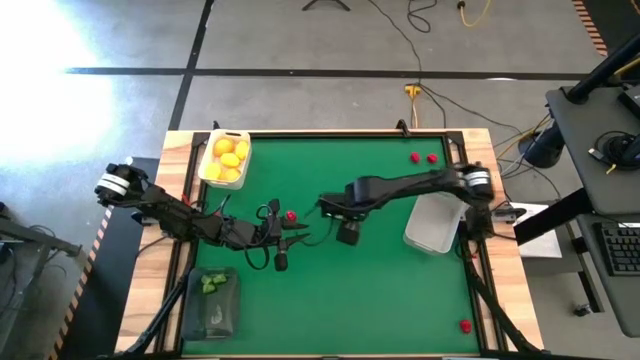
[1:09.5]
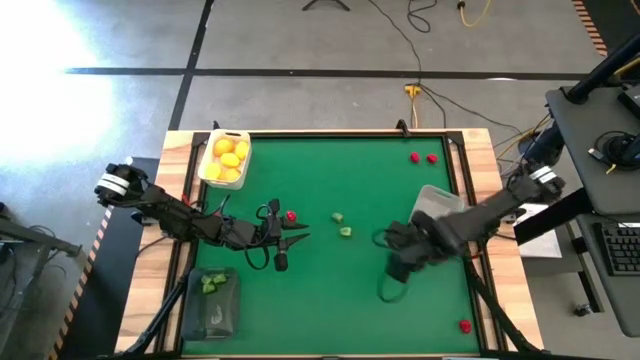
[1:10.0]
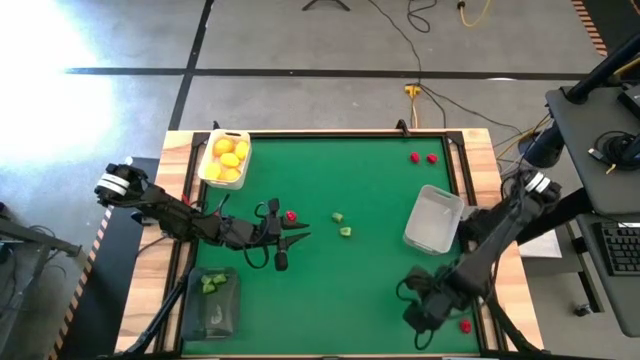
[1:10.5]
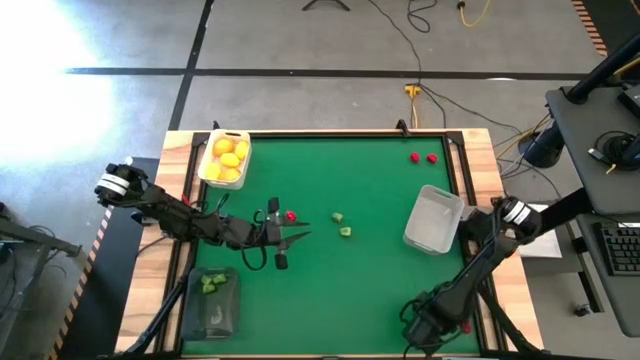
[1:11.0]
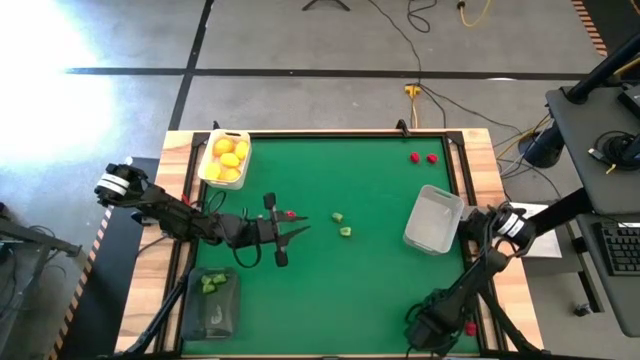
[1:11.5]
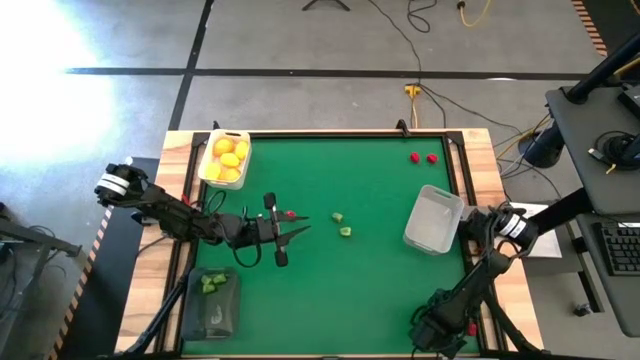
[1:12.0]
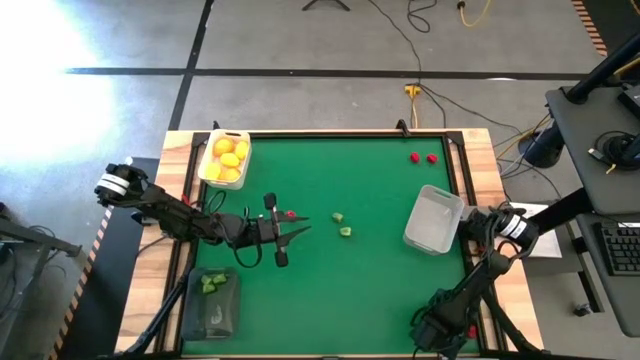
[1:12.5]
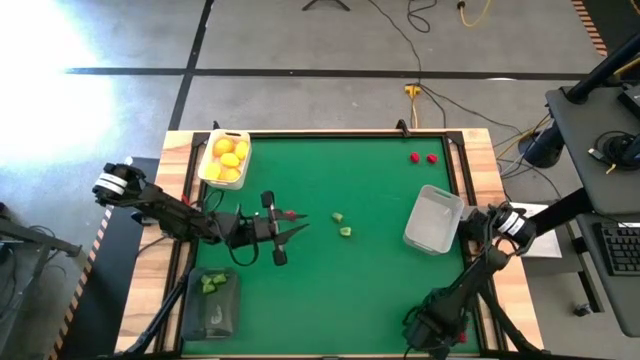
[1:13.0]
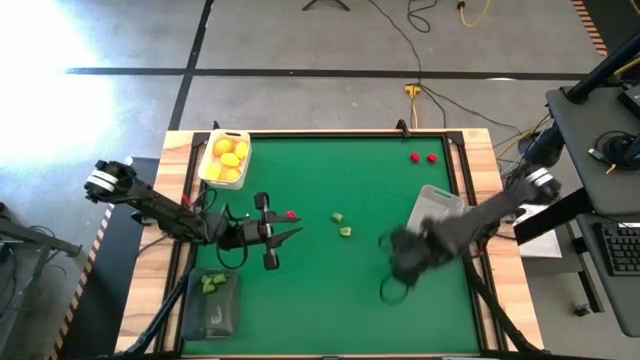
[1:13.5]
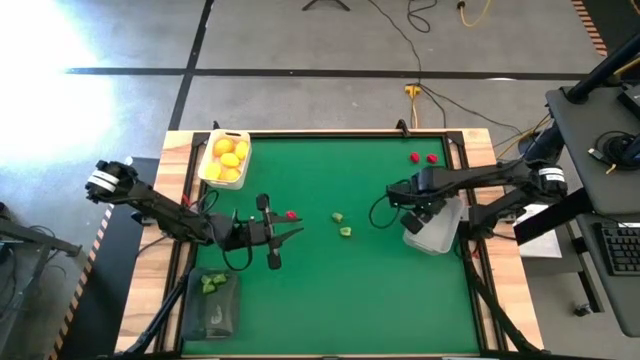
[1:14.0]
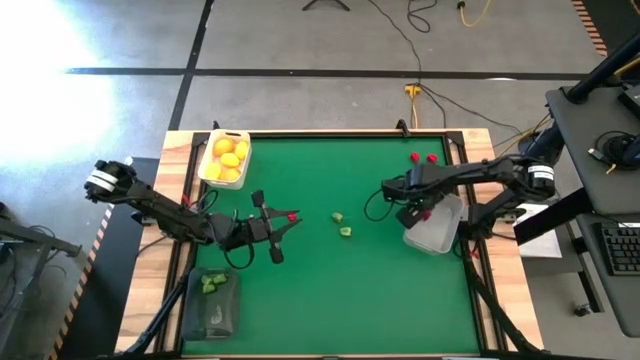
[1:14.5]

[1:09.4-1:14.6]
Task: Sort produce into baskets
Put the red chili pepper into the gray bin

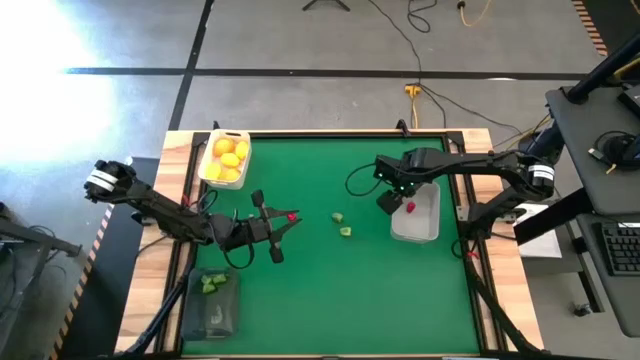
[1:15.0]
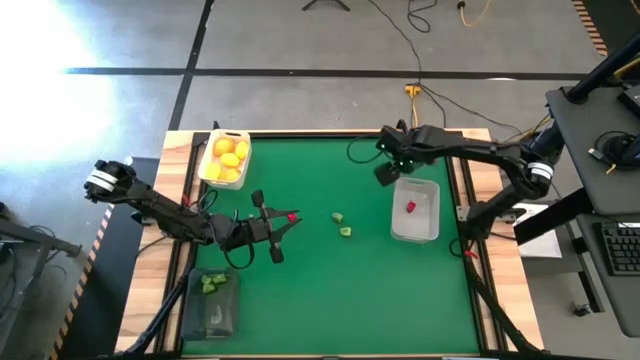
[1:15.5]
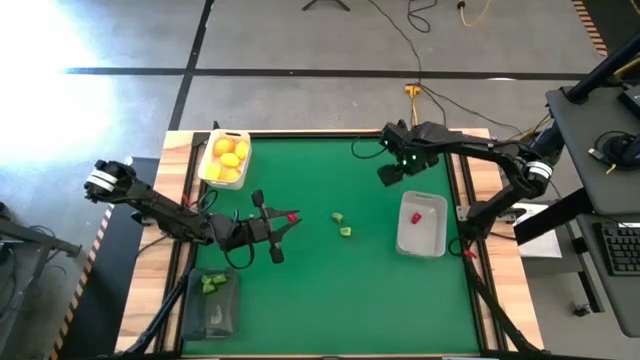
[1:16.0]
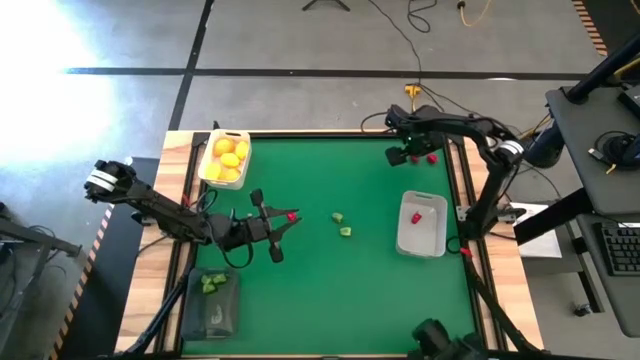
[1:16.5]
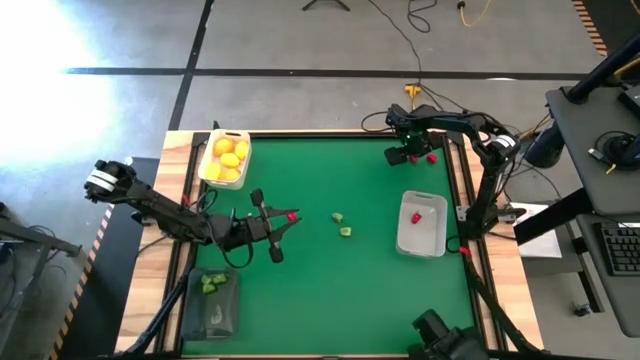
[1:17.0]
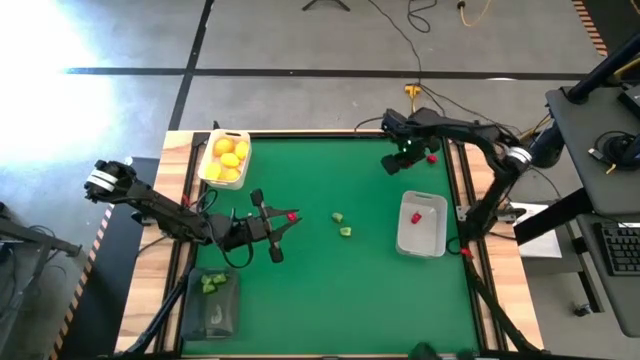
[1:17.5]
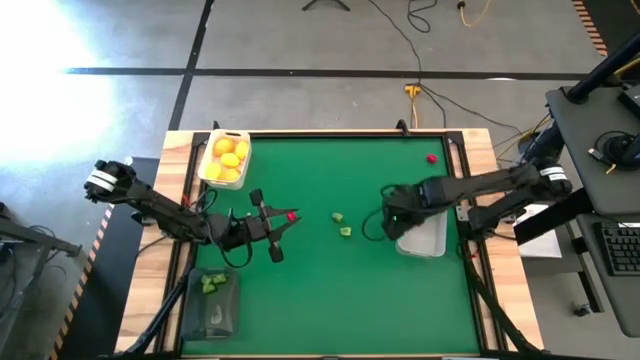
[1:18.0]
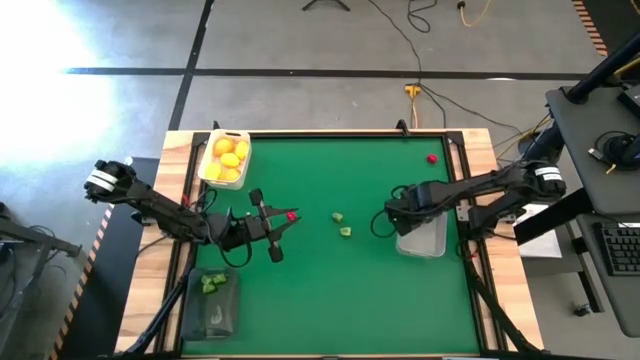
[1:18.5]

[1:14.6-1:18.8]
Put the red chili pepper into the gray bin

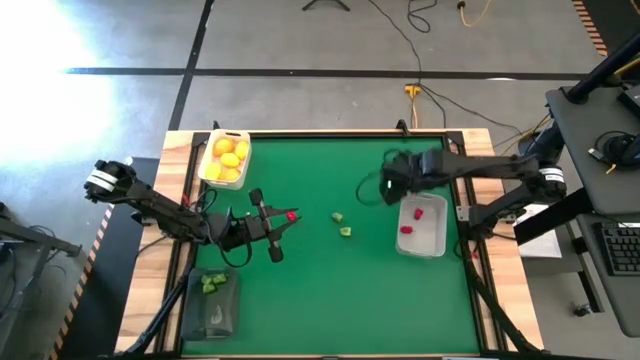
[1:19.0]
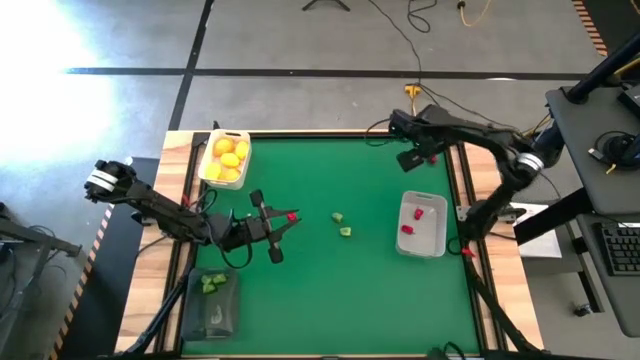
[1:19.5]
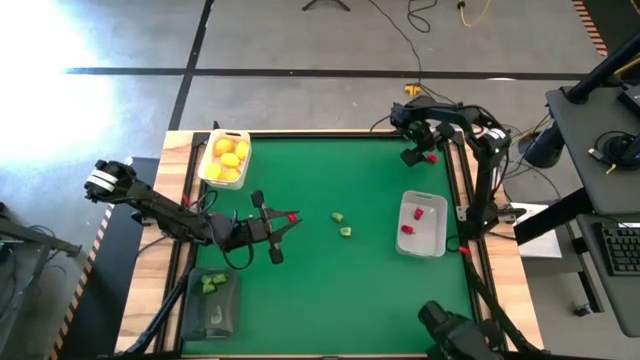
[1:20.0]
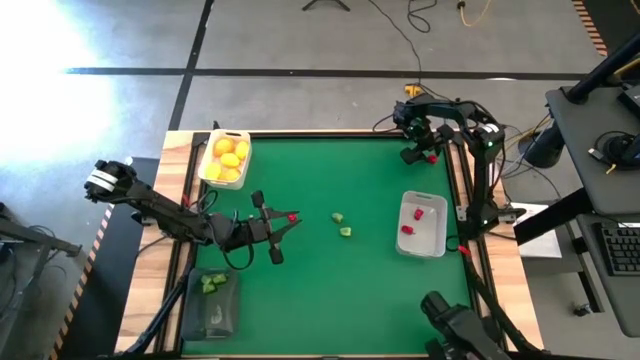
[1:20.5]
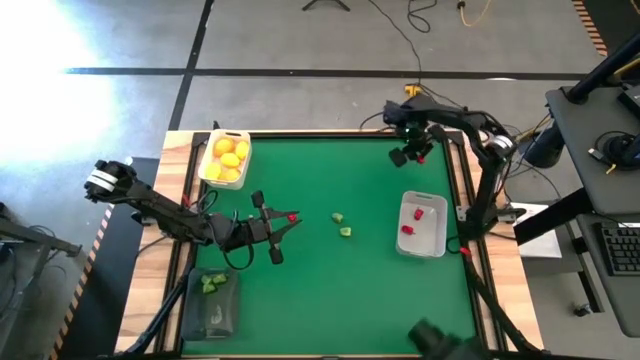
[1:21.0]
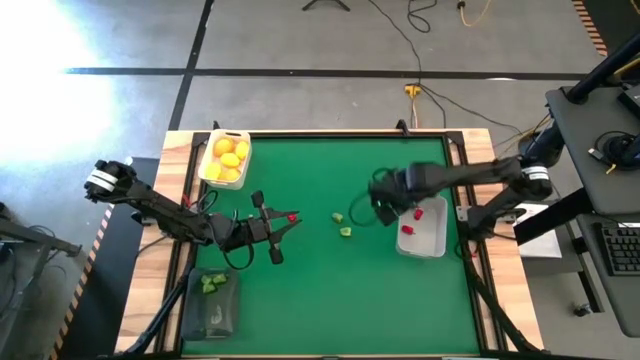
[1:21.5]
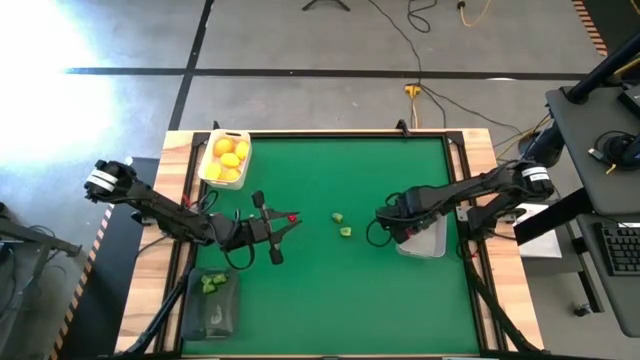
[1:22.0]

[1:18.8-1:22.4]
Put the red chili pepper into the gray bin

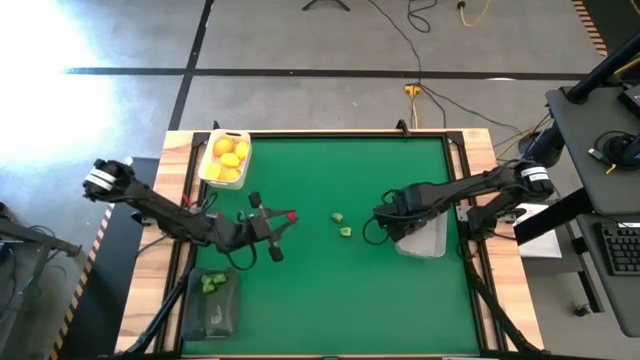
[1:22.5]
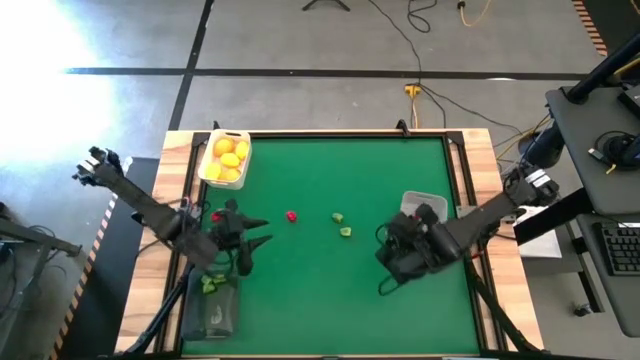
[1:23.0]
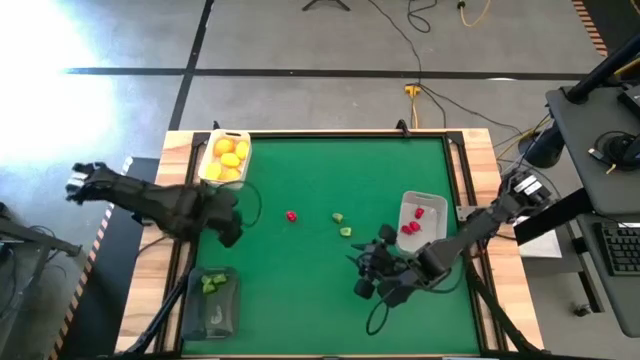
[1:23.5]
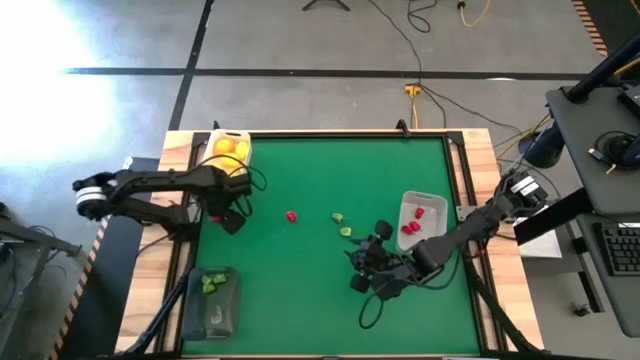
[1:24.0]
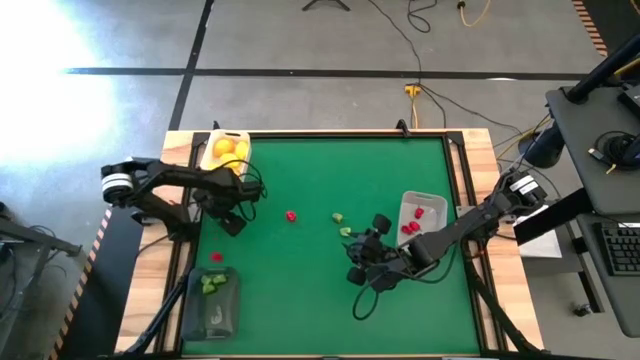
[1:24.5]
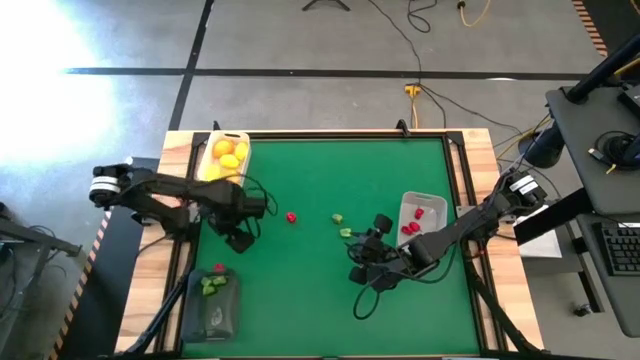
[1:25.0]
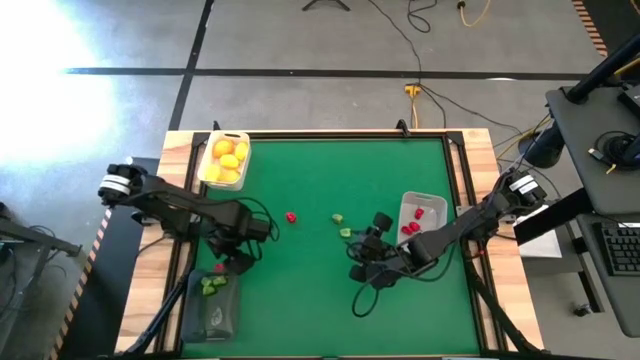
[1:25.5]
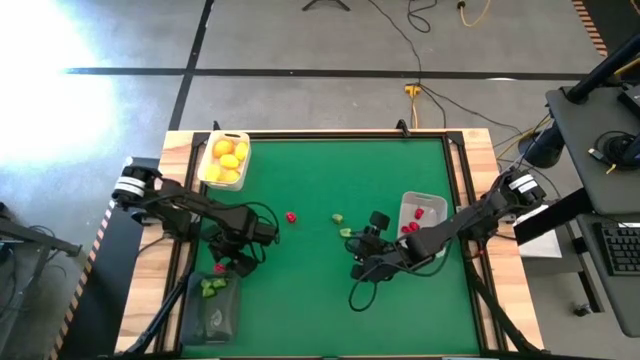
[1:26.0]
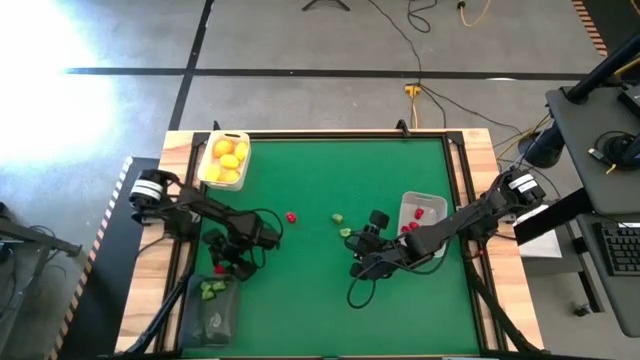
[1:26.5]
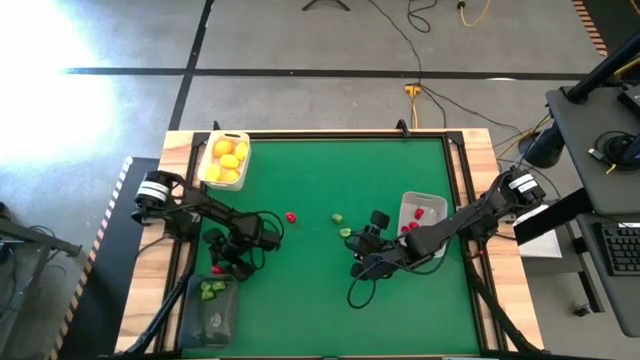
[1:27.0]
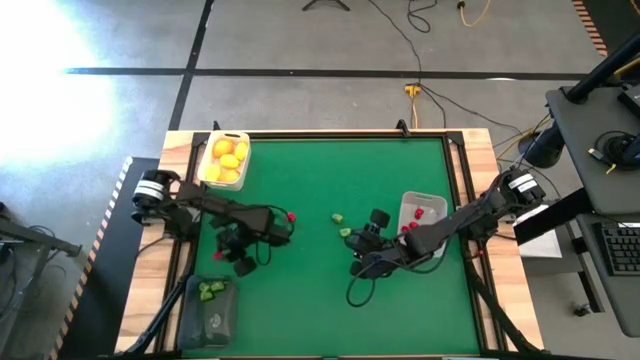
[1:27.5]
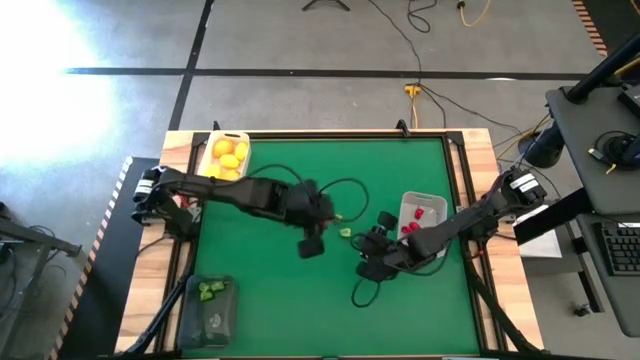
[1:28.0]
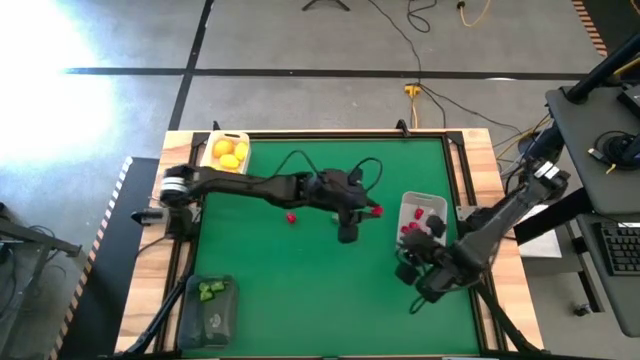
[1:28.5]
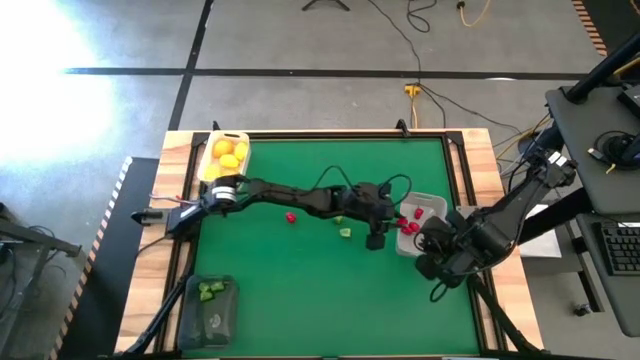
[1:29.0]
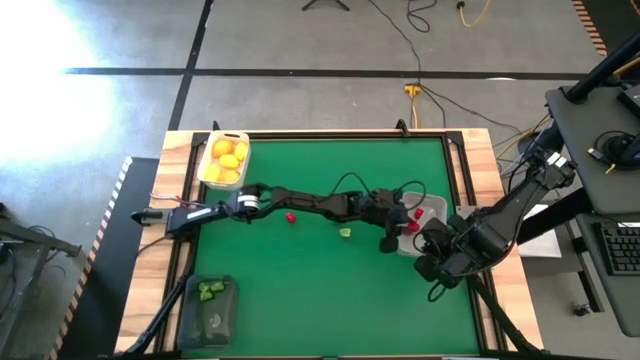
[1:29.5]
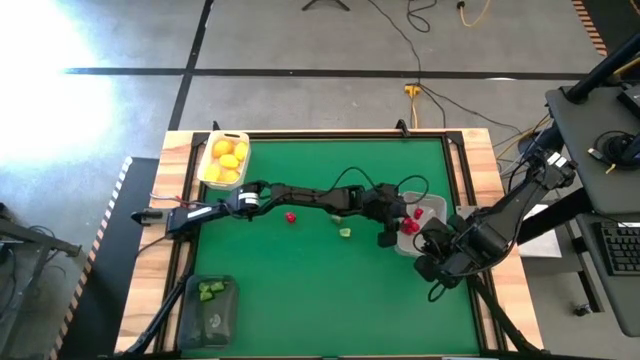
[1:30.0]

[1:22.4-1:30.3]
Put the red chili pepper into the gray bin
